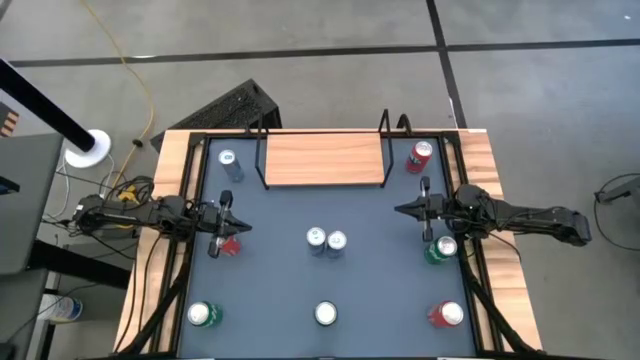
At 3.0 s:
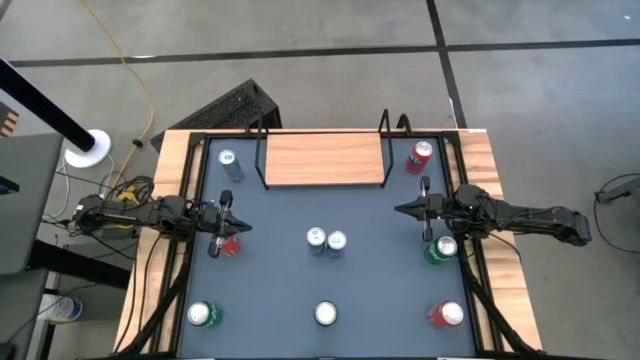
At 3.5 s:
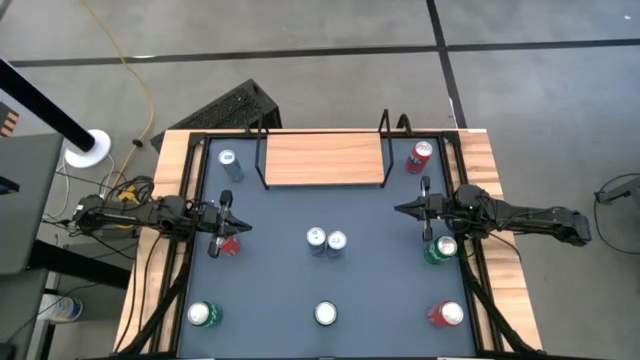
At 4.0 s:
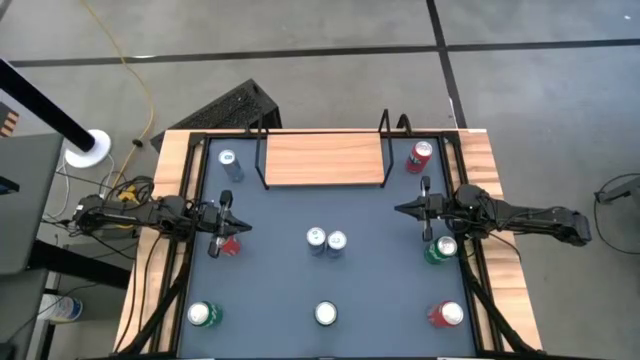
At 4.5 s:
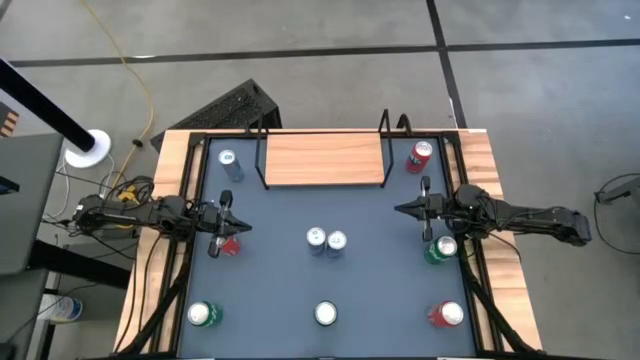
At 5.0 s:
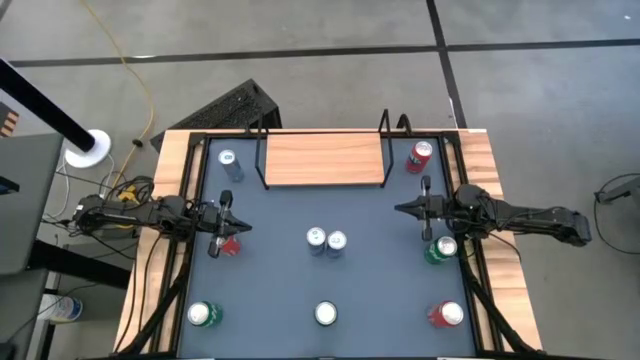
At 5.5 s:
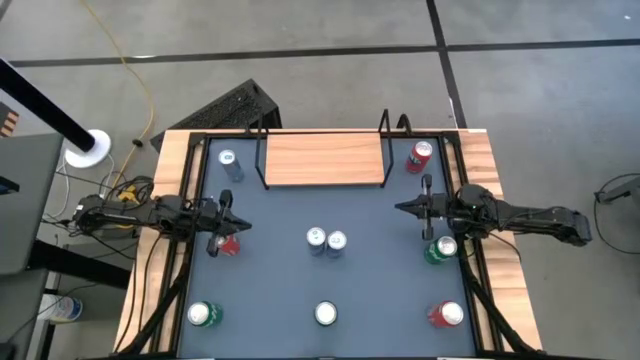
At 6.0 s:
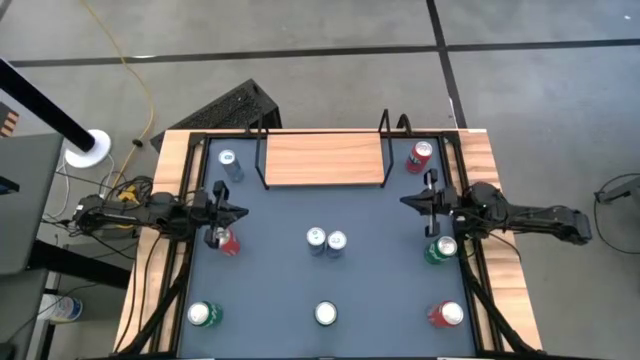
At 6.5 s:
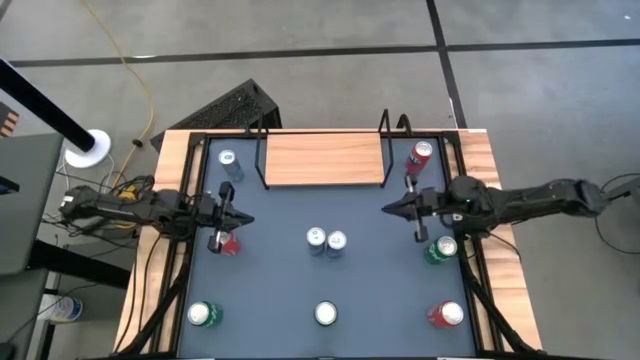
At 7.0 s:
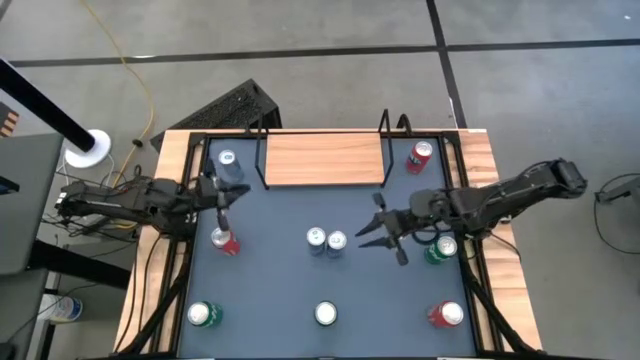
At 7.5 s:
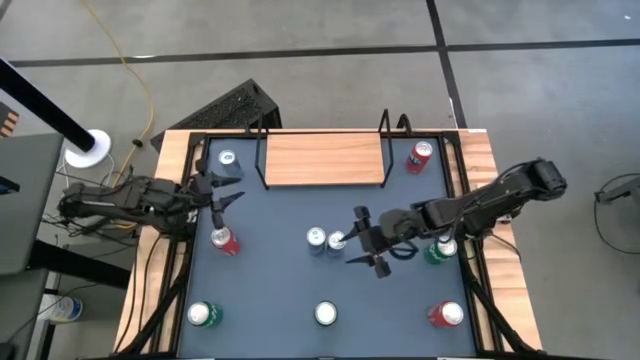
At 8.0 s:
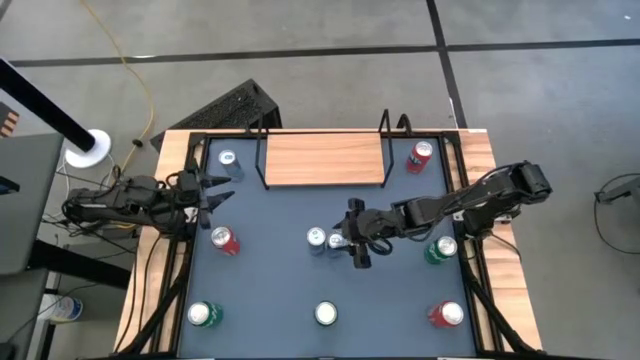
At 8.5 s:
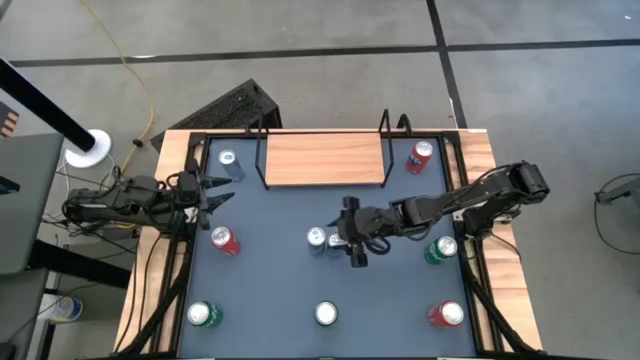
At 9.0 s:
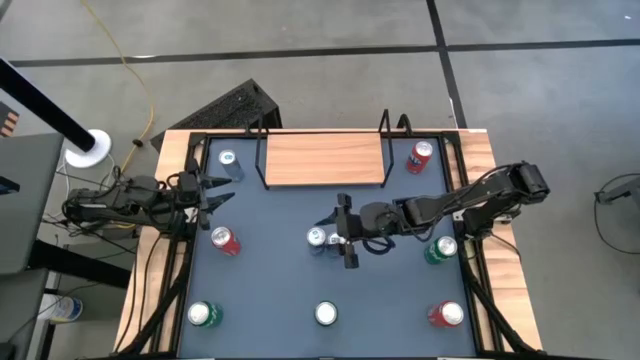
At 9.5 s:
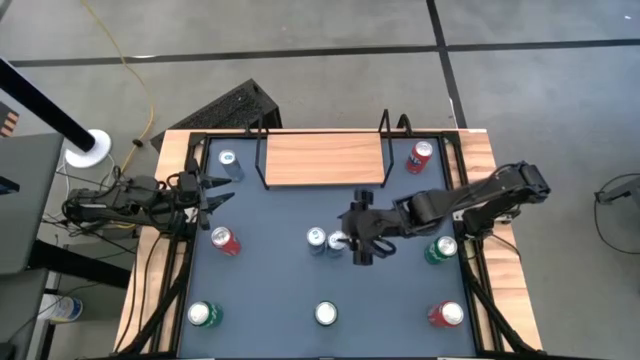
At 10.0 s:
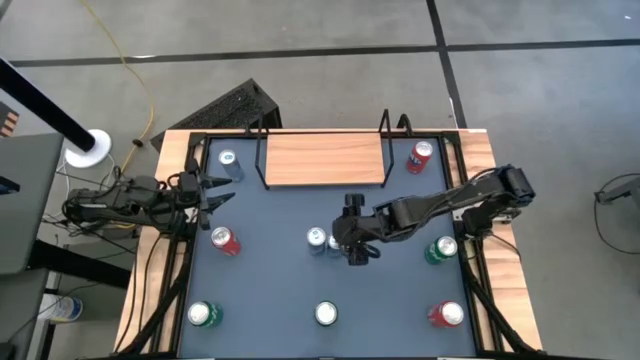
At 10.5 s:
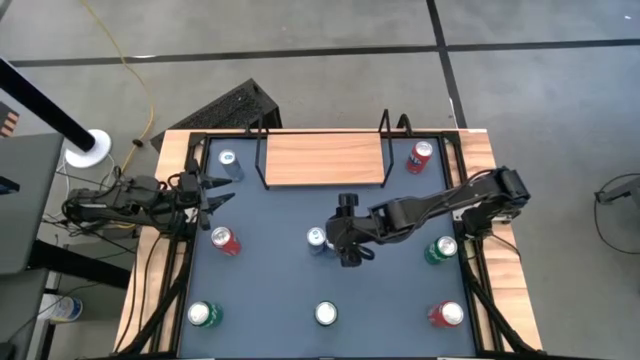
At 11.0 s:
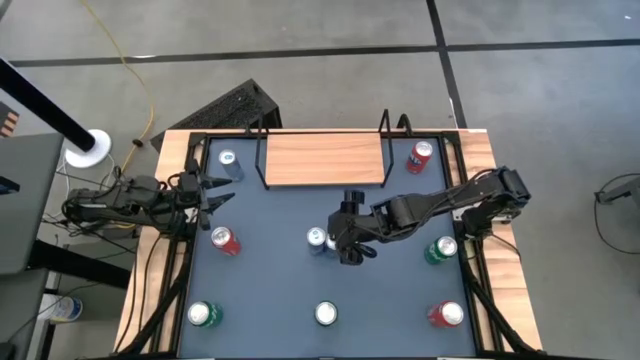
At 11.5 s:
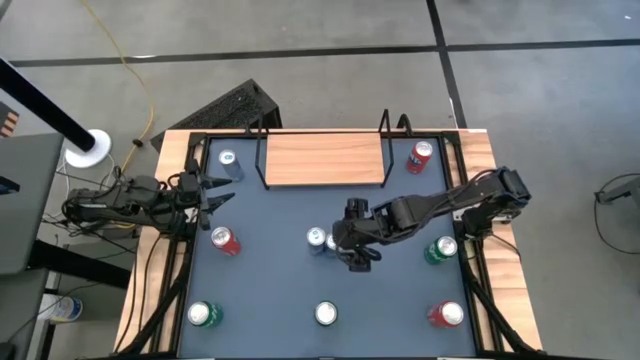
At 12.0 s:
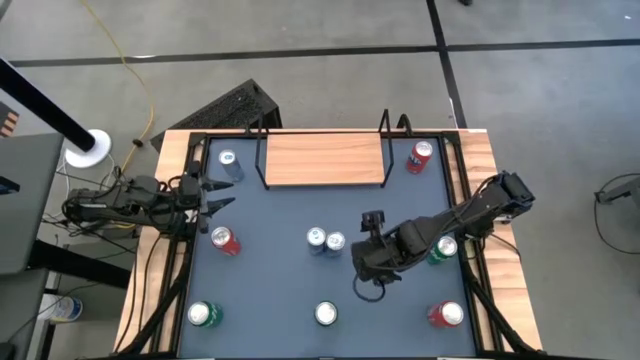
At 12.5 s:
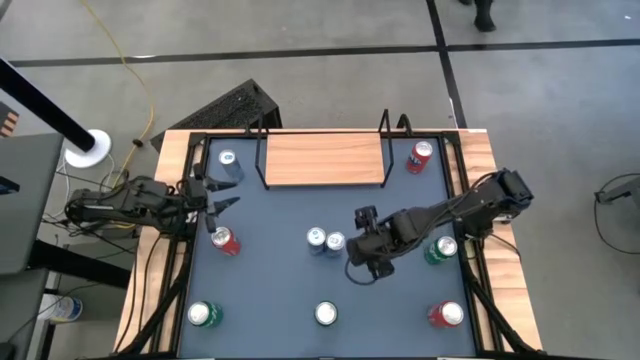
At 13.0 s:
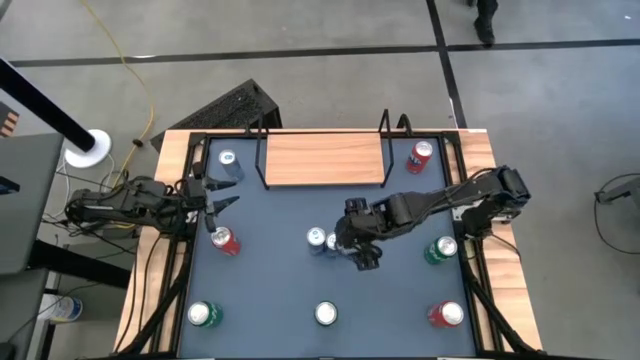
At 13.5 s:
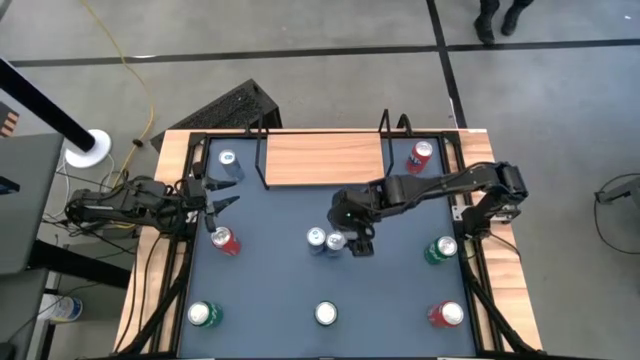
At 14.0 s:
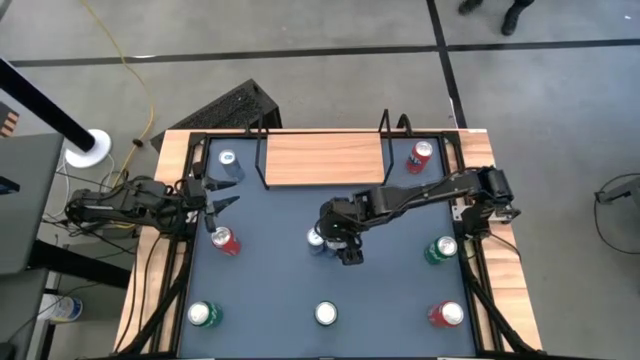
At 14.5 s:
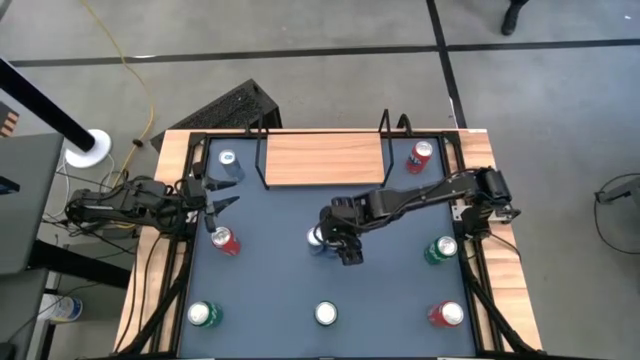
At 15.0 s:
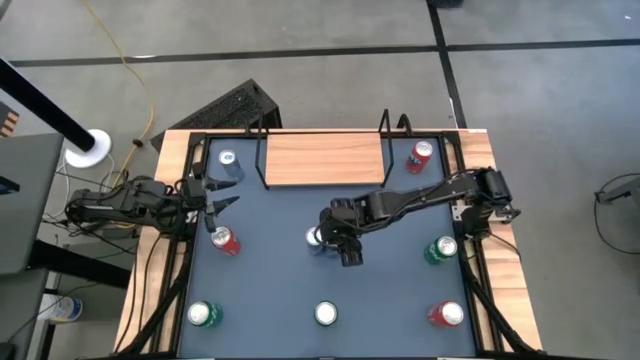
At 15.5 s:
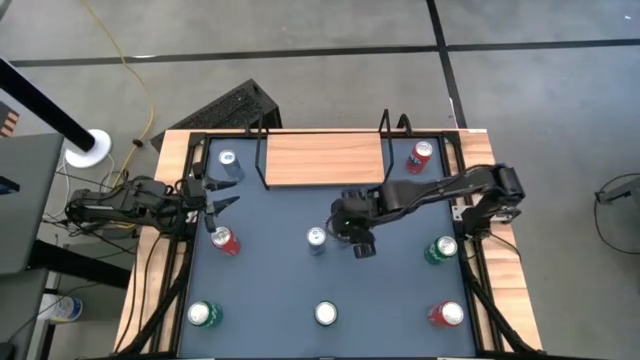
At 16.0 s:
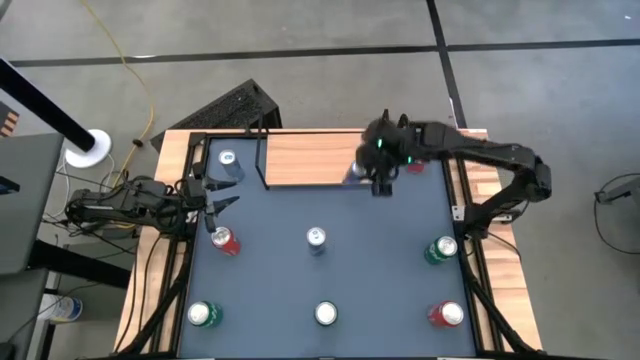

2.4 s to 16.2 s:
Task: Place canned beverage on shelf
Put the bottom right blue soda can on the shelf

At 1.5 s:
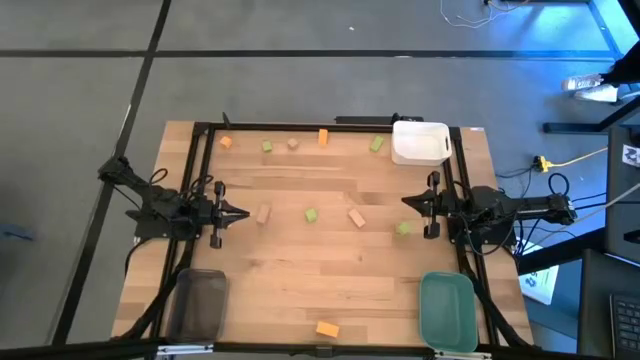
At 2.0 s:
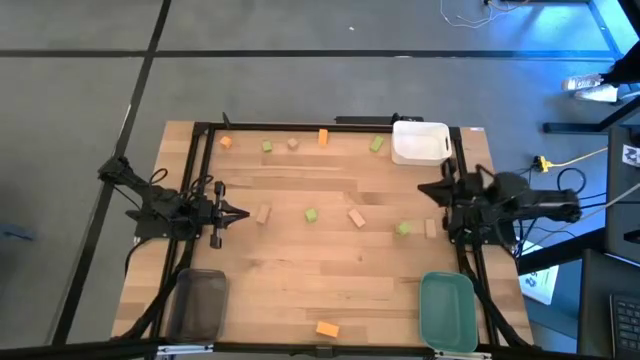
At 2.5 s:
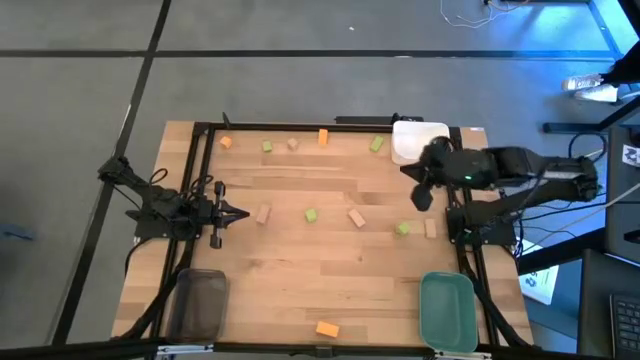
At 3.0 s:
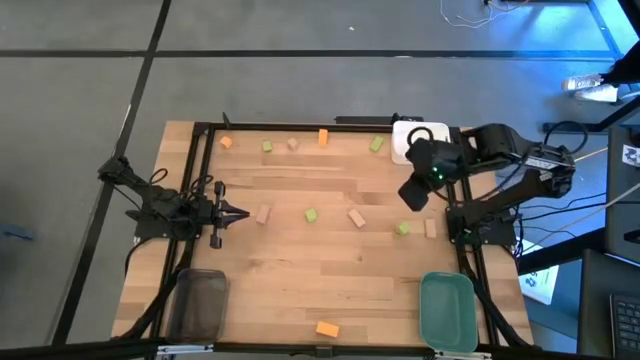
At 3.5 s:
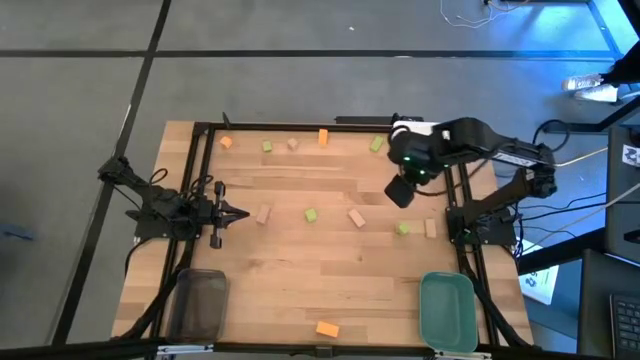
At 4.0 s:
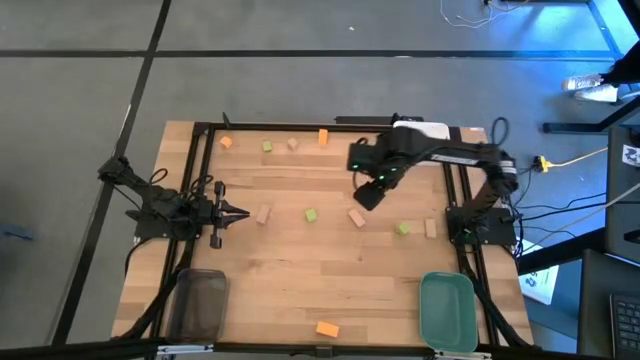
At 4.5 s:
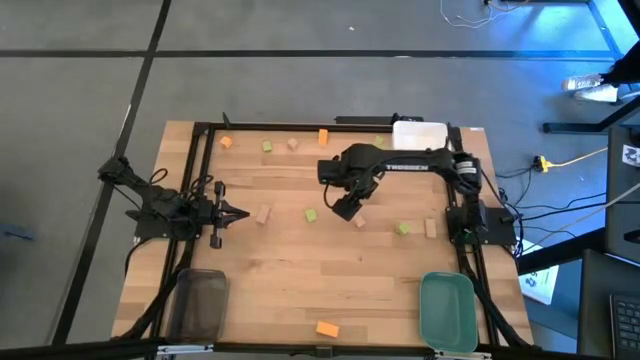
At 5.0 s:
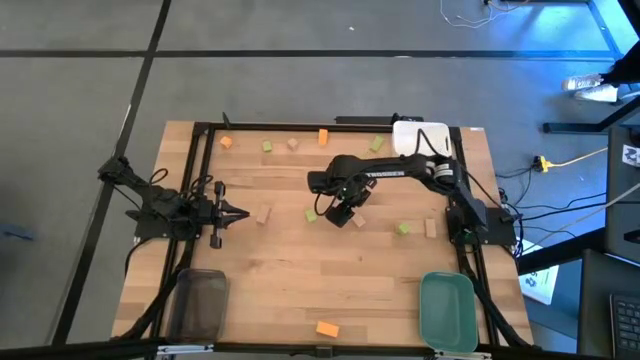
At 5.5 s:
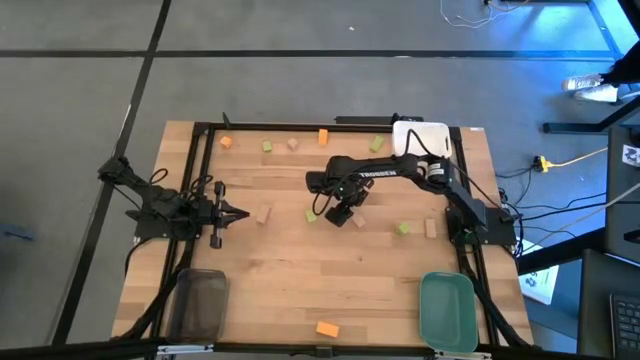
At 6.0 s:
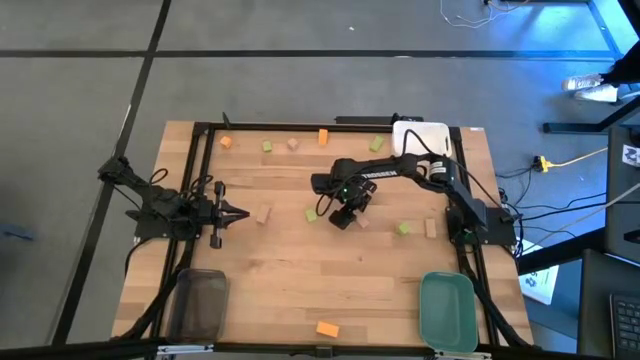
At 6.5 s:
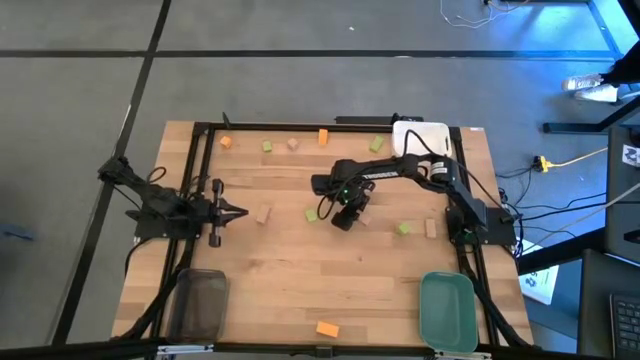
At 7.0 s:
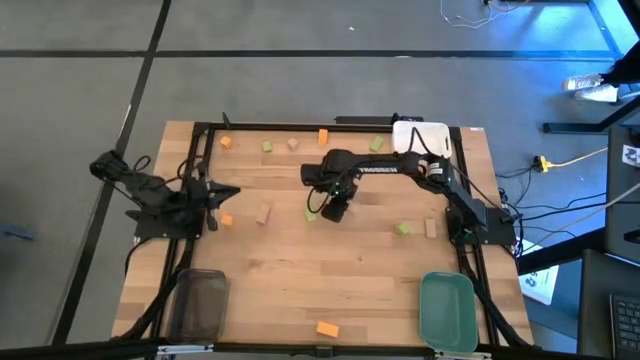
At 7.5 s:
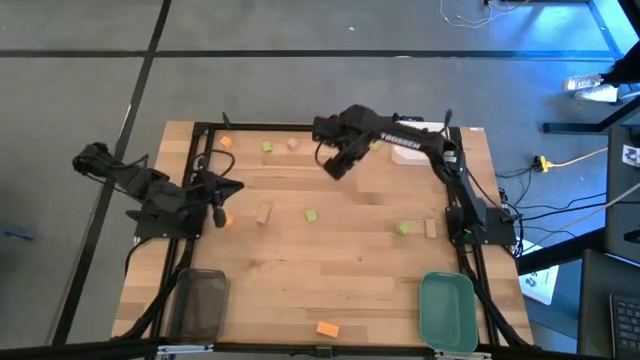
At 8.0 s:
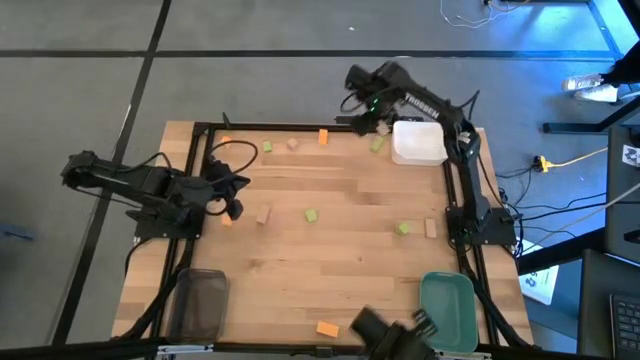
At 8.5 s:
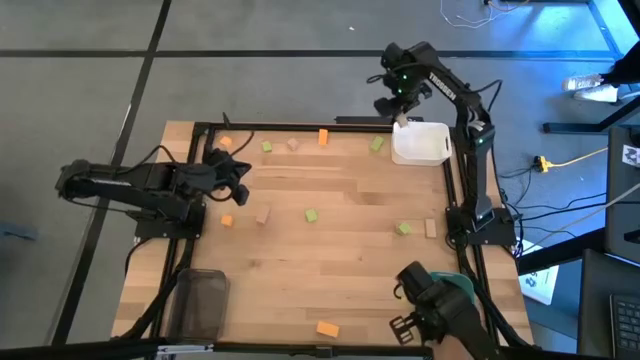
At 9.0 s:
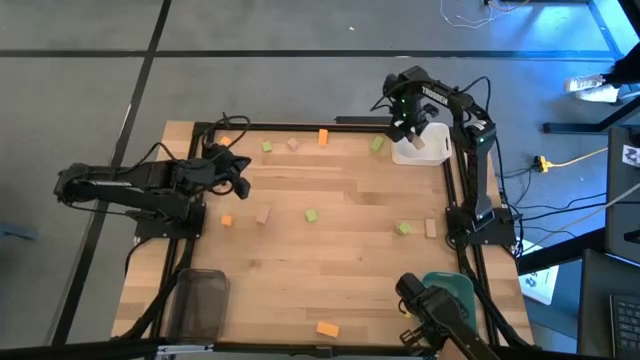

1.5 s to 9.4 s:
Task: Sort & place blocks by color
Put the center brown block into the white bin
